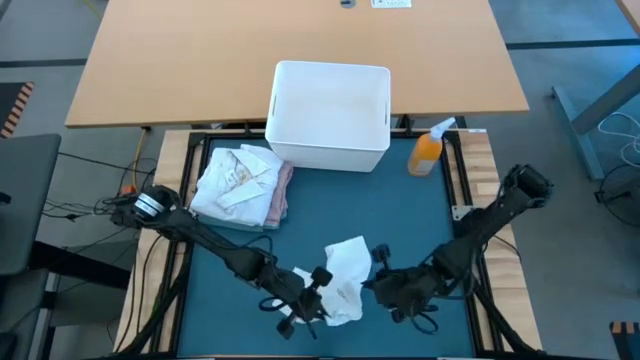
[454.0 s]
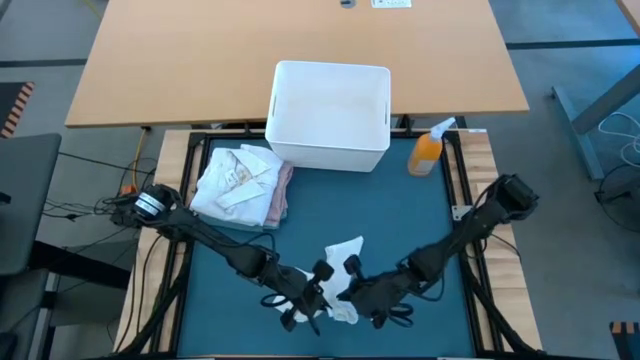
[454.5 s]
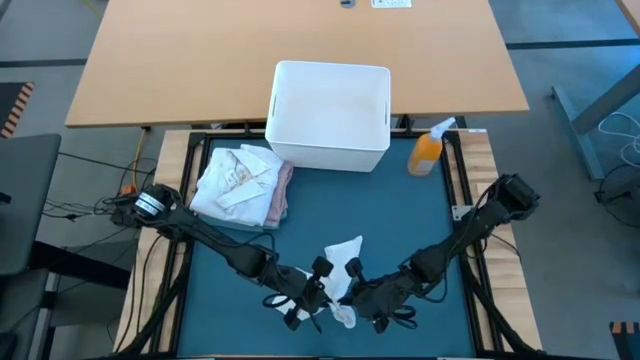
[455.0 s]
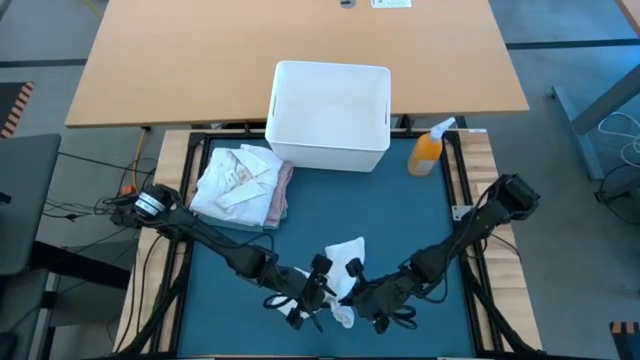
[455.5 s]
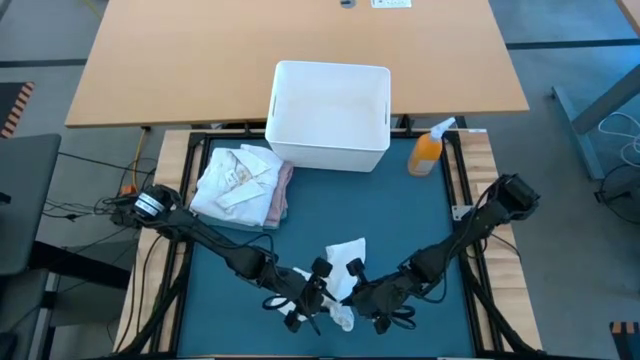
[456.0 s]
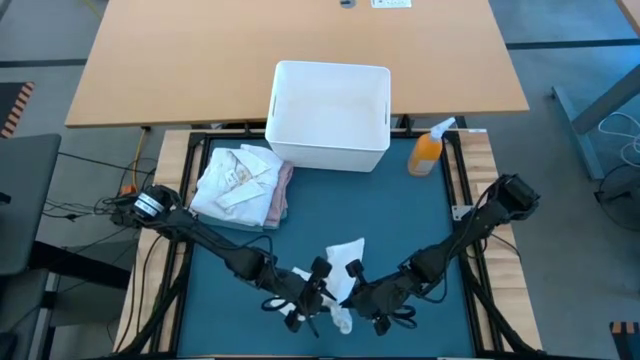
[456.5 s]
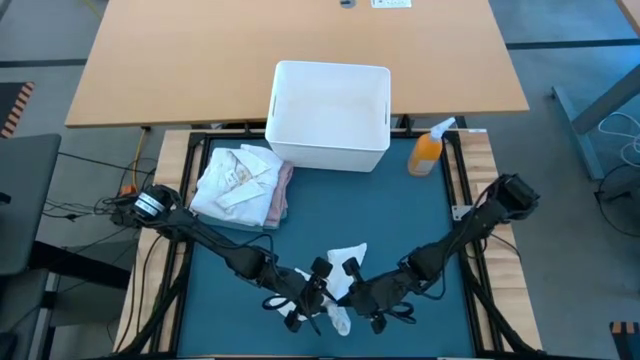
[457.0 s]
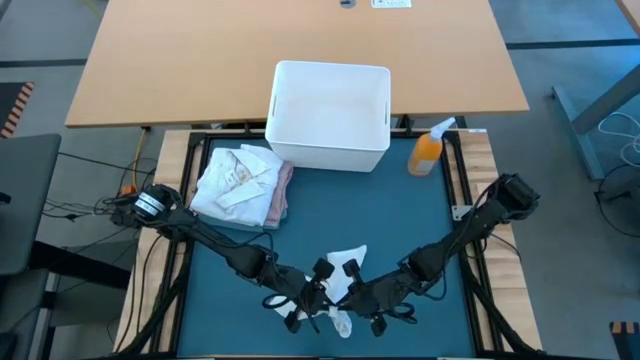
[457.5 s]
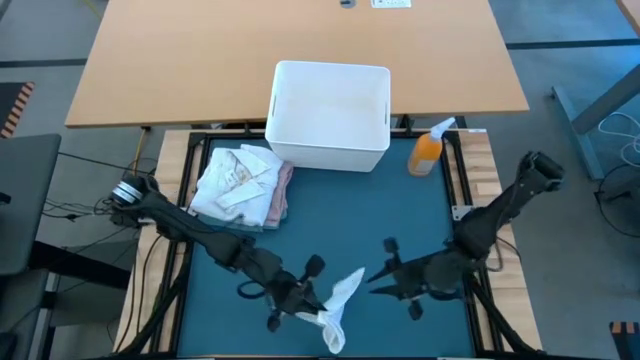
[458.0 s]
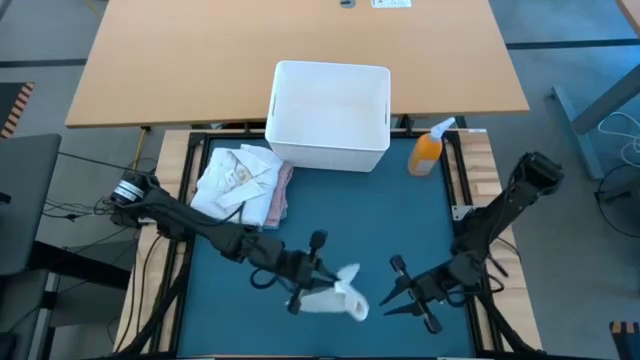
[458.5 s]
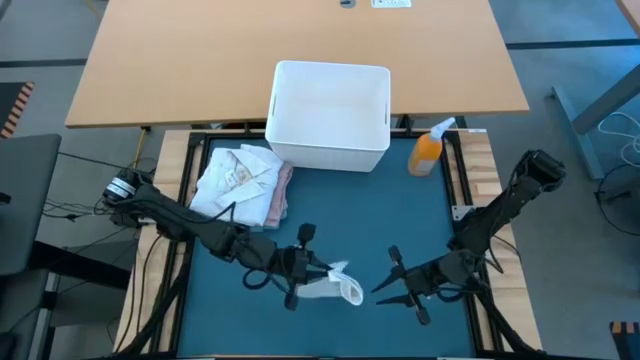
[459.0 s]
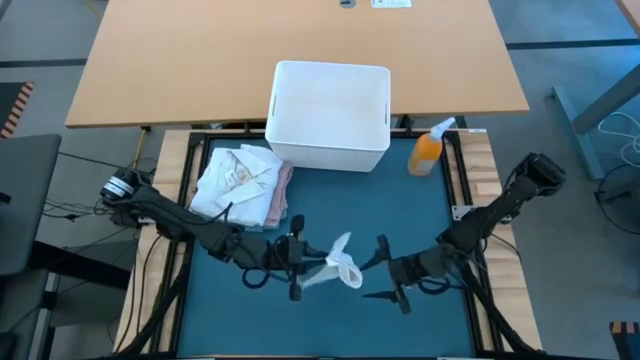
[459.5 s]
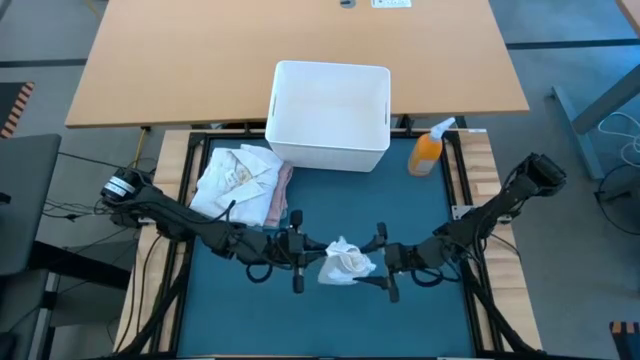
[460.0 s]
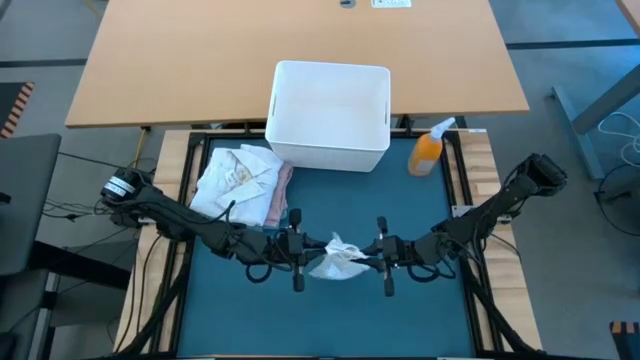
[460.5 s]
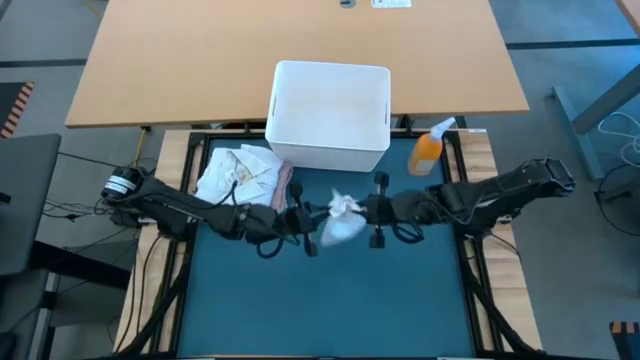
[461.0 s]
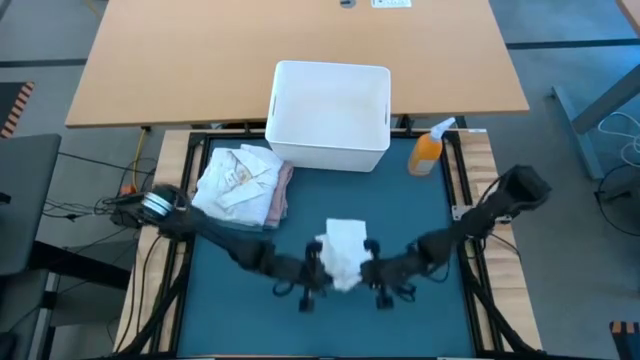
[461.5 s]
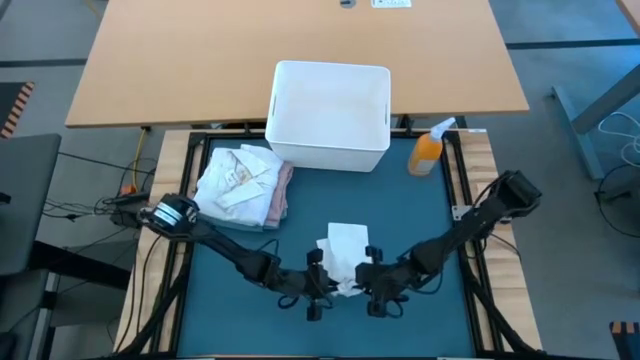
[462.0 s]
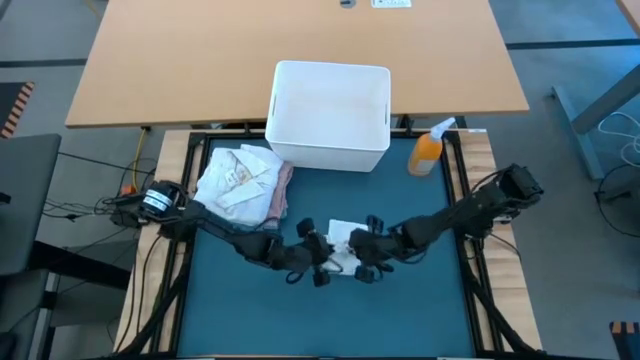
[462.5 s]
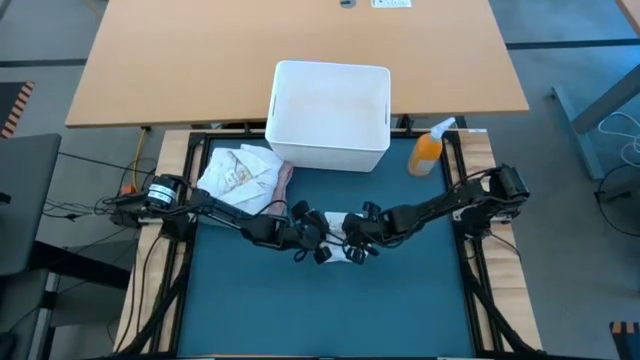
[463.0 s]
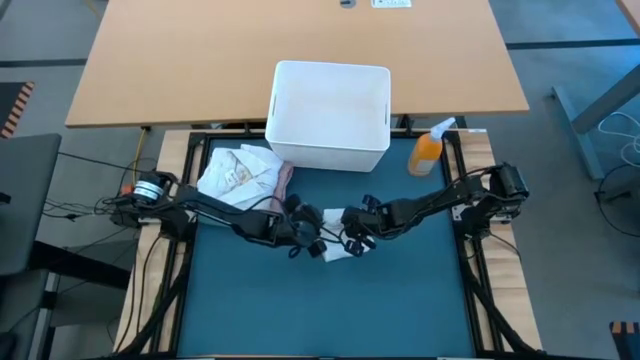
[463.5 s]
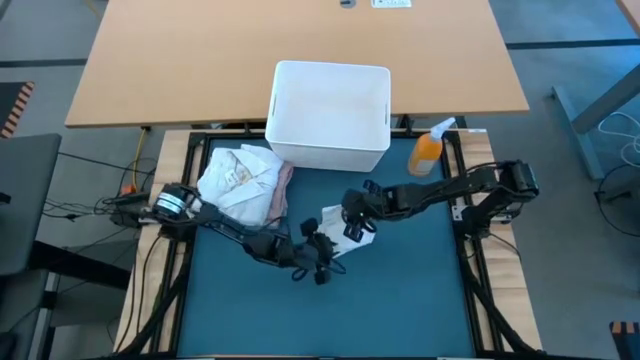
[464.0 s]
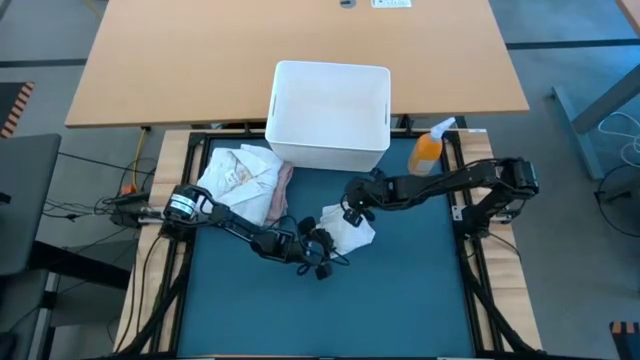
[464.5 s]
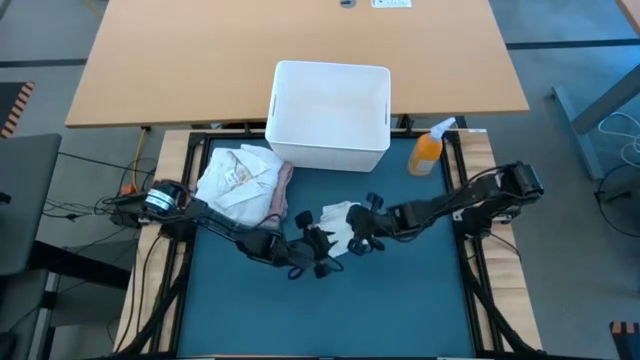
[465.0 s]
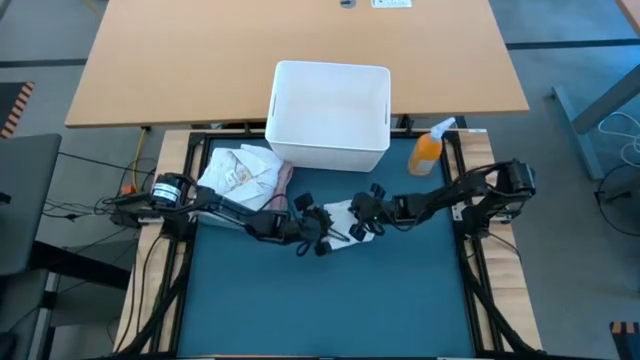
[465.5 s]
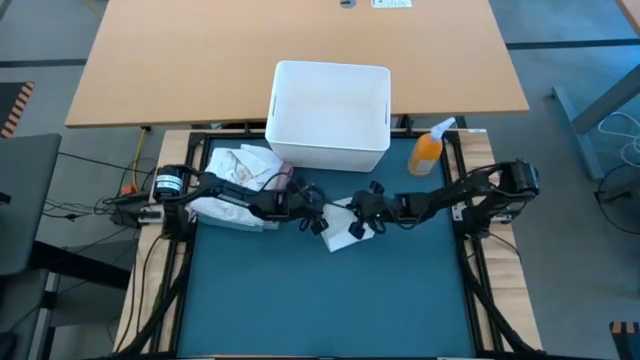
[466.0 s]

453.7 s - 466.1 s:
Task: Fold Laundry from Bin
Fold the white shorts

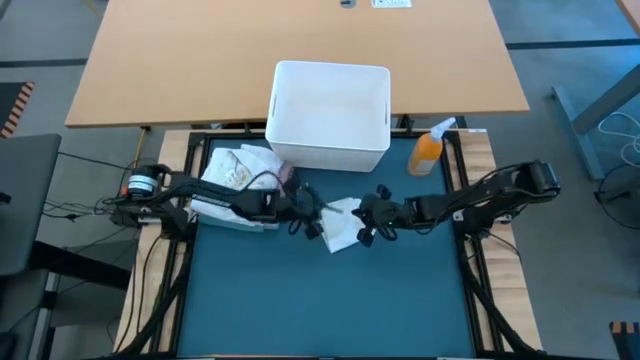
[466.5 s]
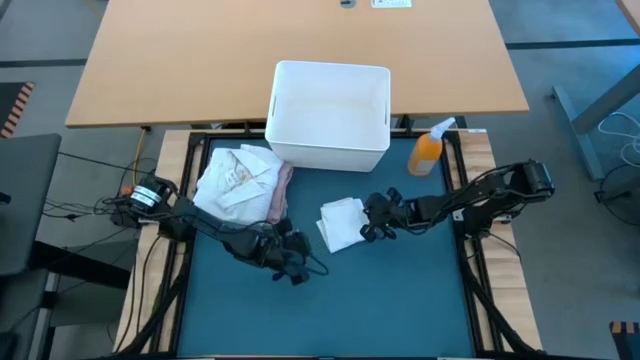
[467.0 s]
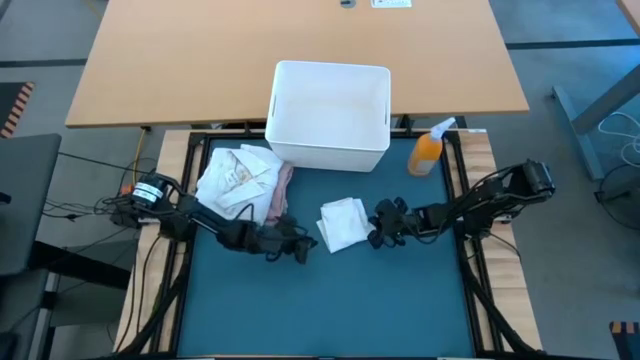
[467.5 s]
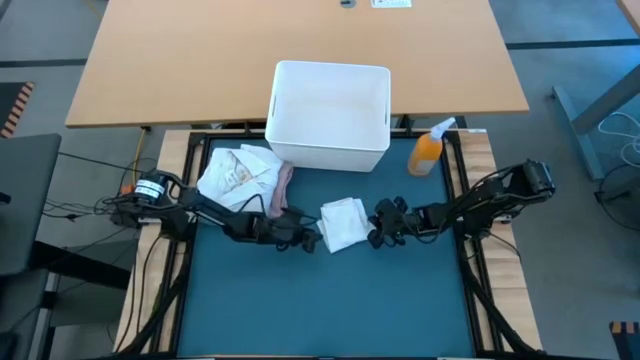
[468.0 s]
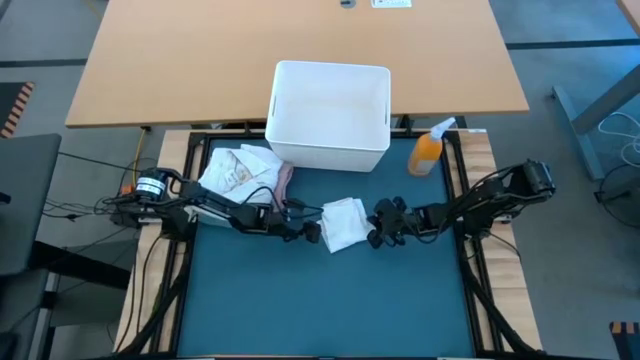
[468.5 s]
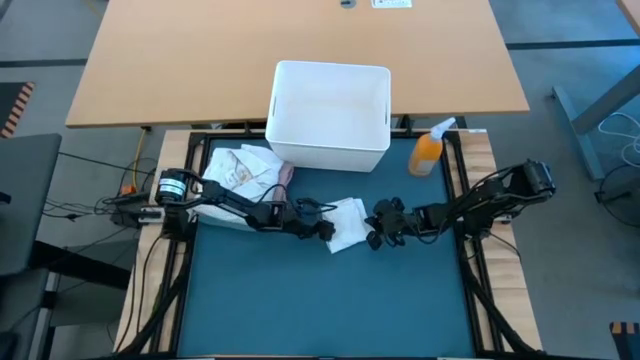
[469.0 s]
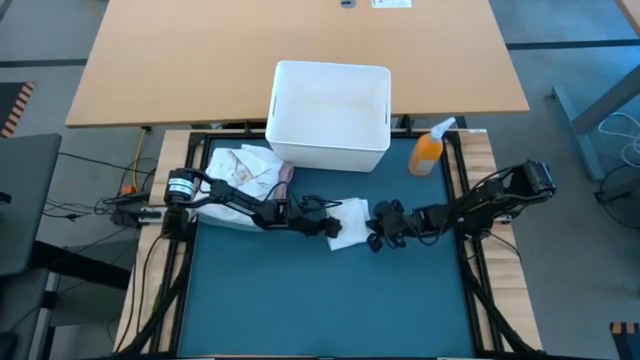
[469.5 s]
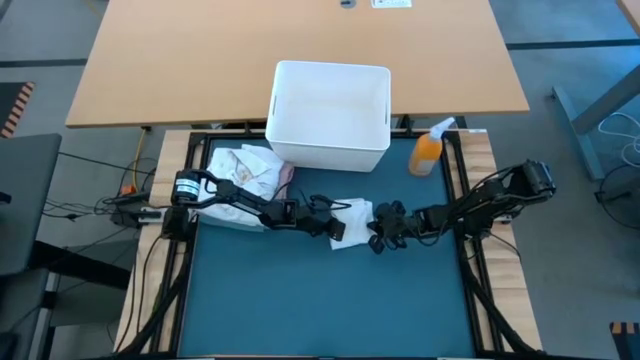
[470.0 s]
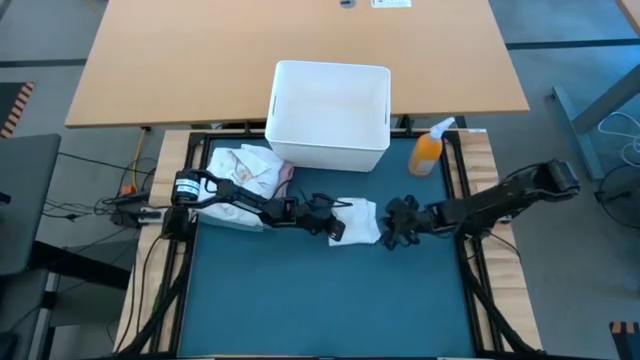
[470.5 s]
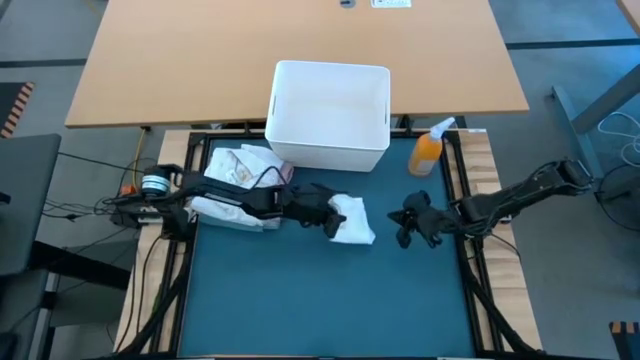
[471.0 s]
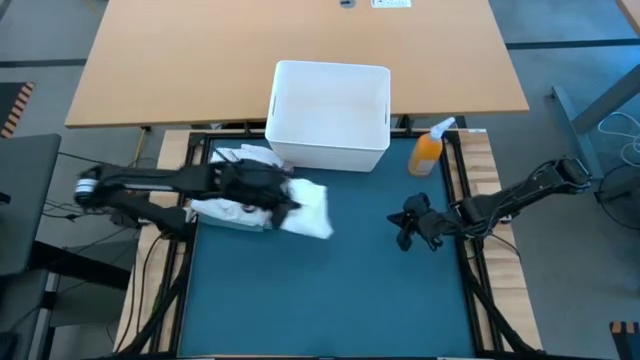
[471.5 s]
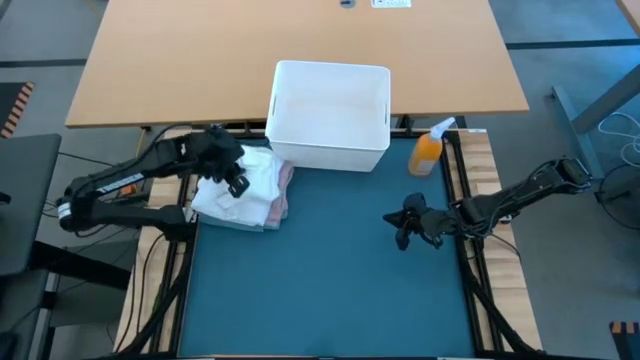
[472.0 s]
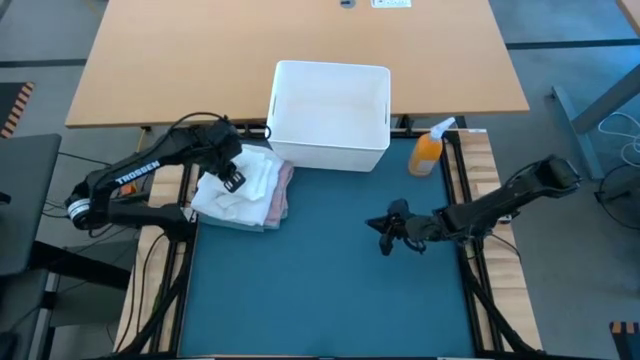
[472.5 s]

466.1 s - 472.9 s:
Stack the white shorts on top of the white shirt

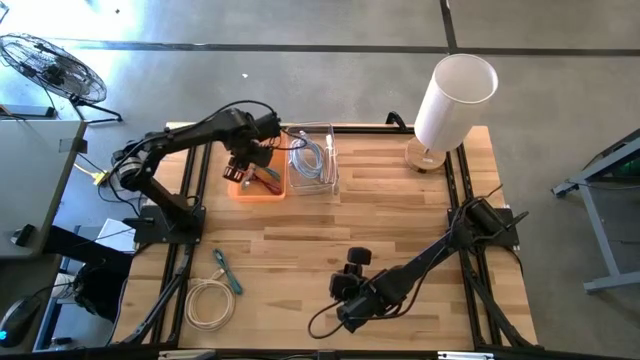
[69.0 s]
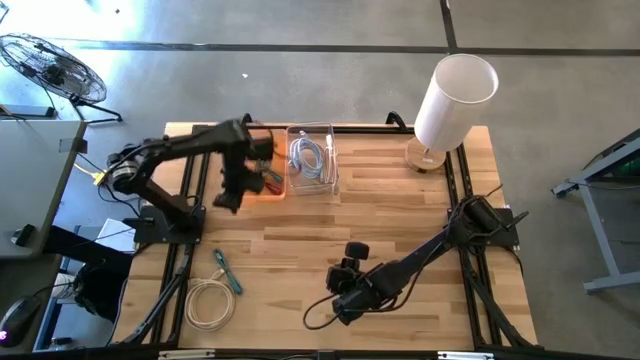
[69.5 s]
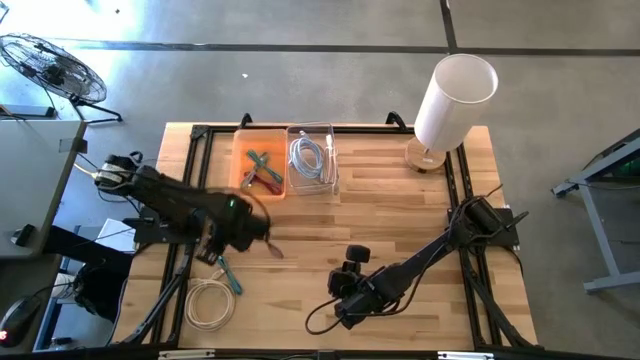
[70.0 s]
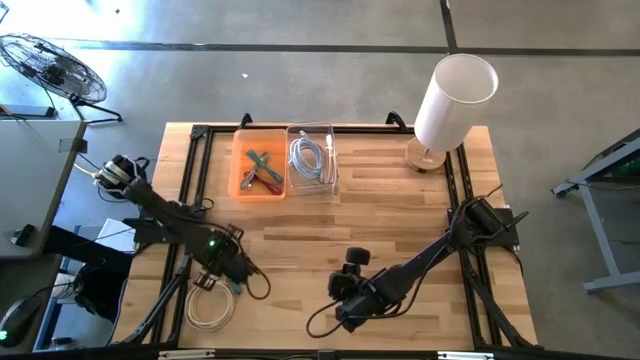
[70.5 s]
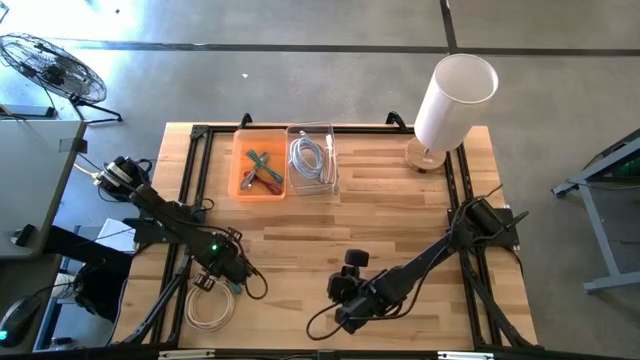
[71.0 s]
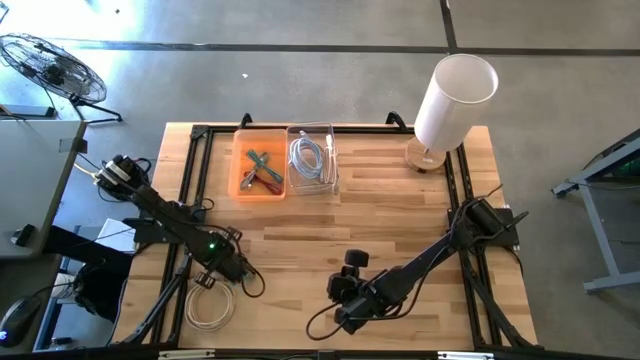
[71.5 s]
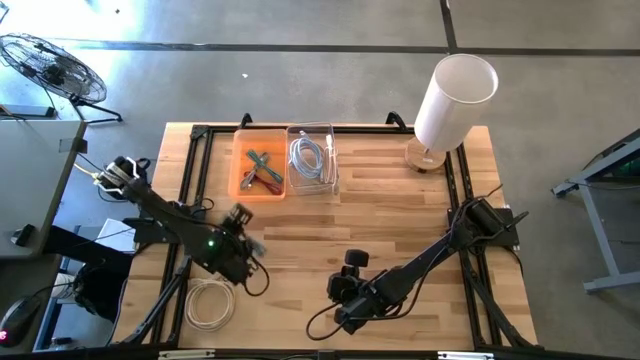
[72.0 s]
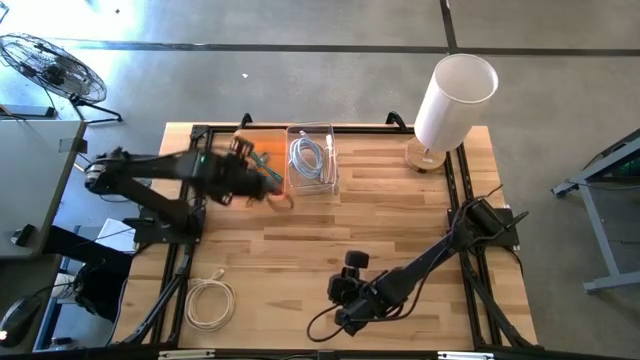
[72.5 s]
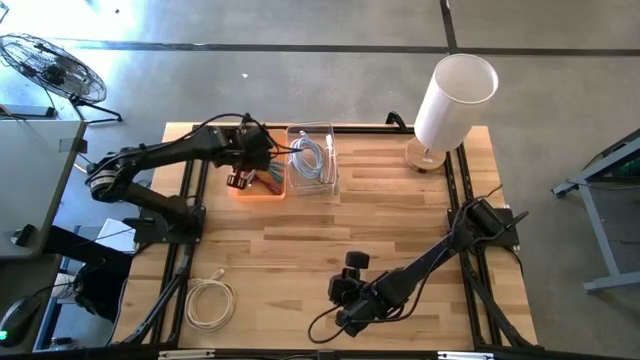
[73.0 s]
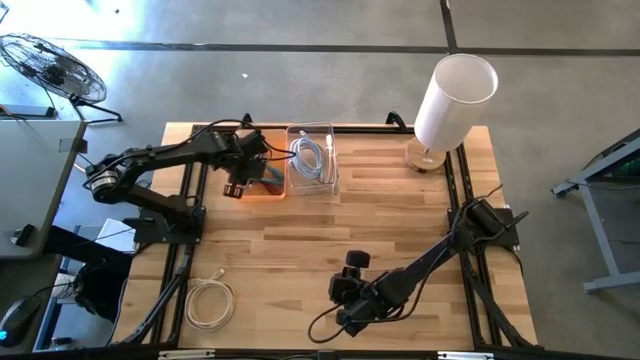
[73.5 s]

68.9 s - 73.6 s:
Task: Pick & Place USB Port
Put the blue and black charger cable into the orange bin
